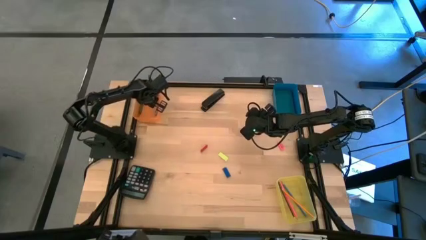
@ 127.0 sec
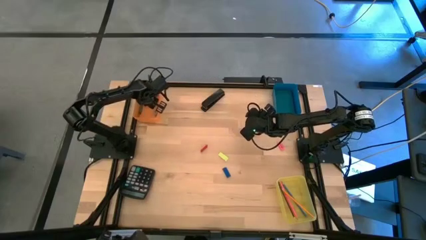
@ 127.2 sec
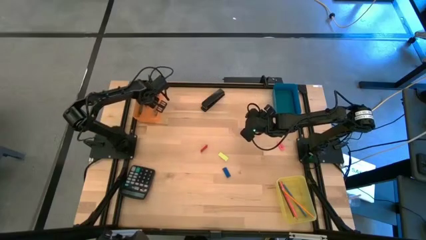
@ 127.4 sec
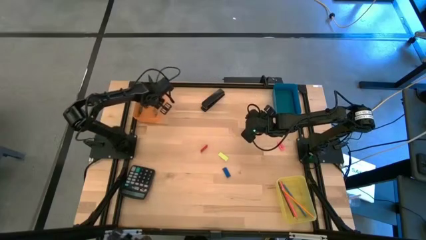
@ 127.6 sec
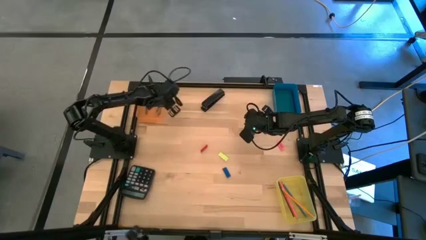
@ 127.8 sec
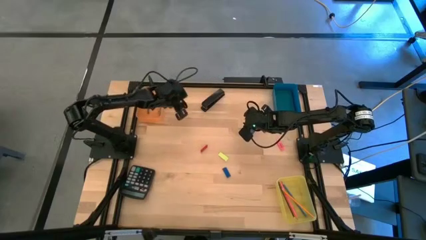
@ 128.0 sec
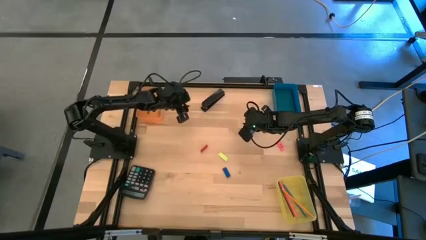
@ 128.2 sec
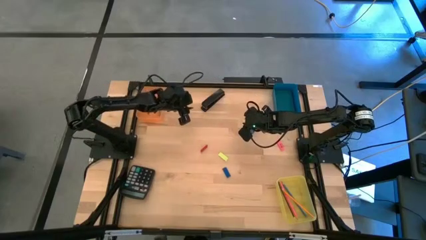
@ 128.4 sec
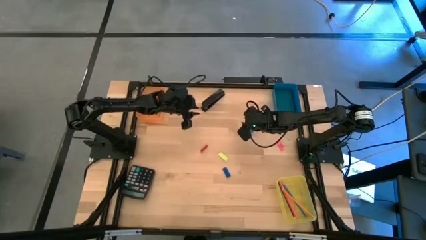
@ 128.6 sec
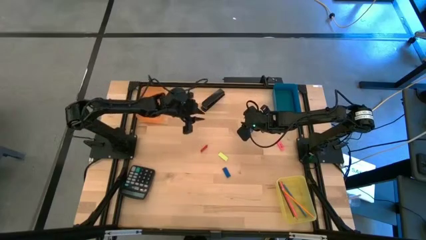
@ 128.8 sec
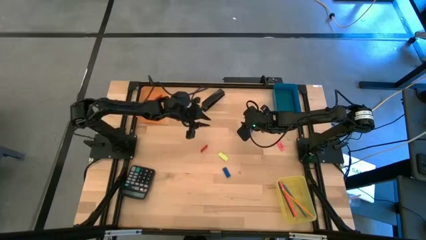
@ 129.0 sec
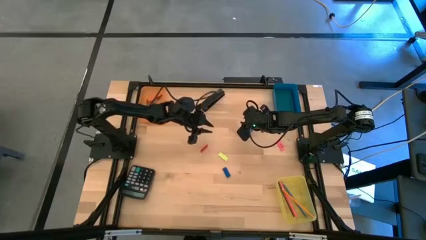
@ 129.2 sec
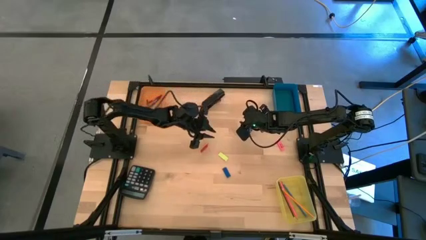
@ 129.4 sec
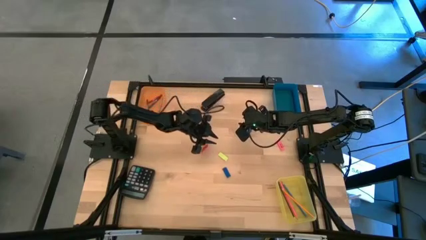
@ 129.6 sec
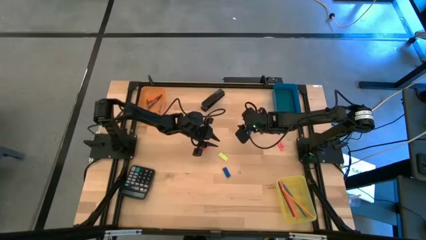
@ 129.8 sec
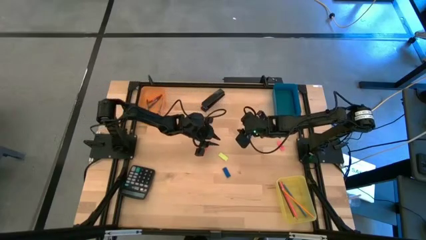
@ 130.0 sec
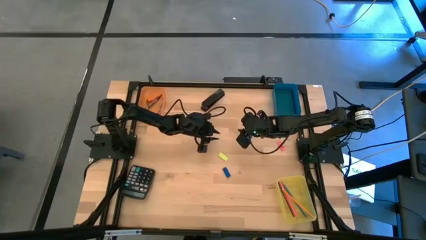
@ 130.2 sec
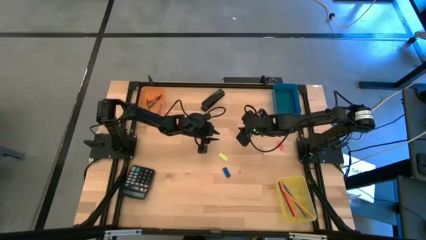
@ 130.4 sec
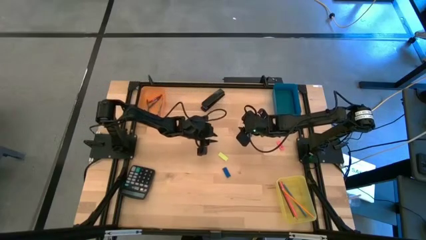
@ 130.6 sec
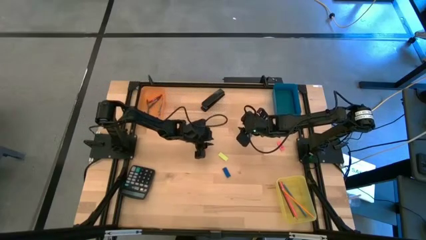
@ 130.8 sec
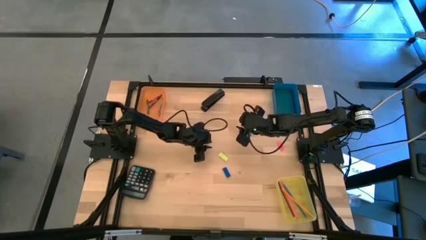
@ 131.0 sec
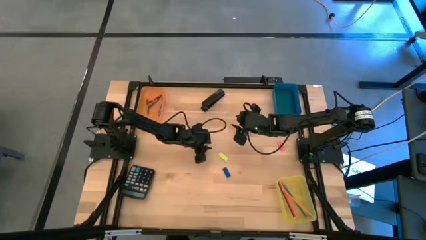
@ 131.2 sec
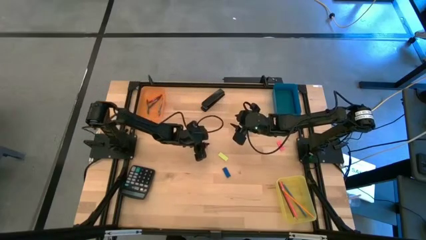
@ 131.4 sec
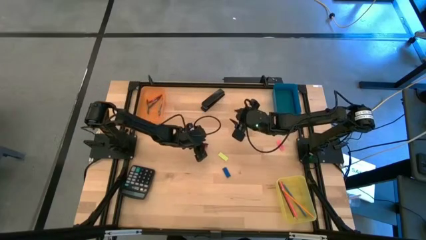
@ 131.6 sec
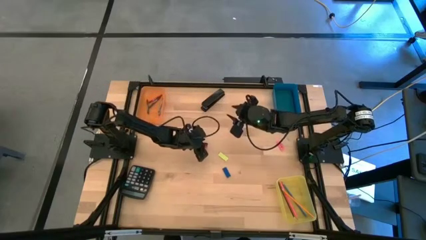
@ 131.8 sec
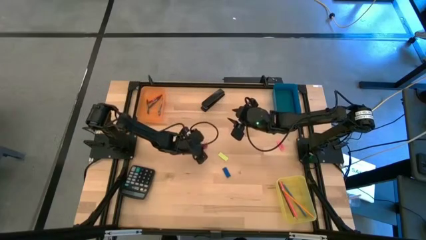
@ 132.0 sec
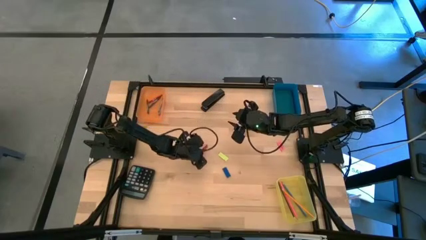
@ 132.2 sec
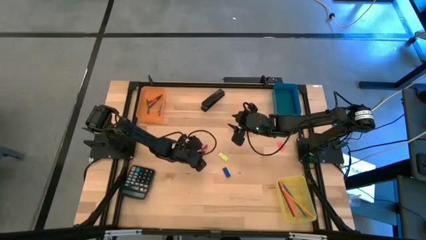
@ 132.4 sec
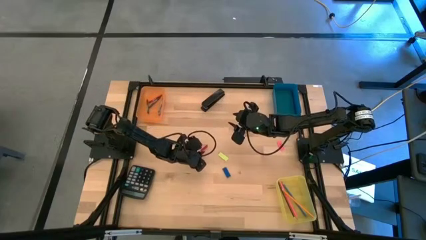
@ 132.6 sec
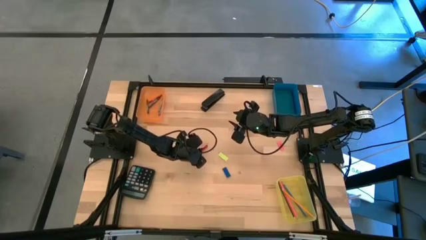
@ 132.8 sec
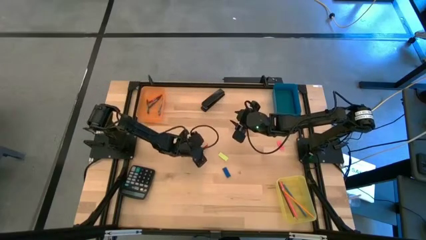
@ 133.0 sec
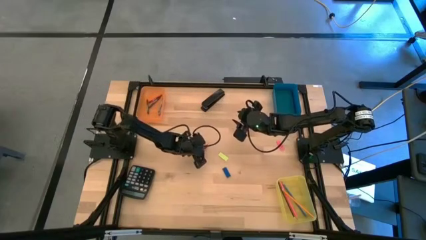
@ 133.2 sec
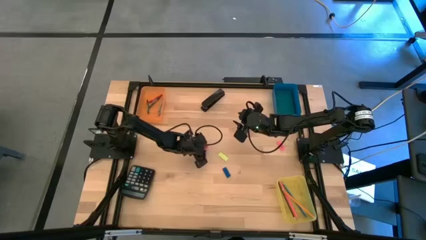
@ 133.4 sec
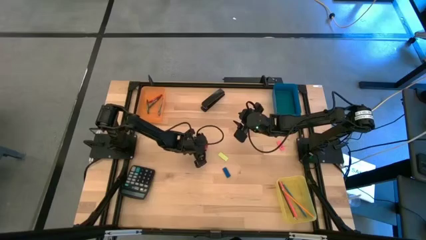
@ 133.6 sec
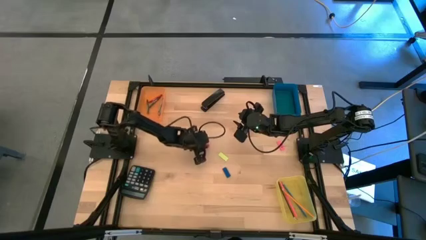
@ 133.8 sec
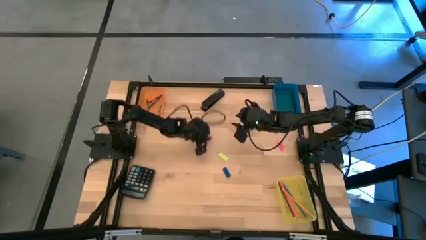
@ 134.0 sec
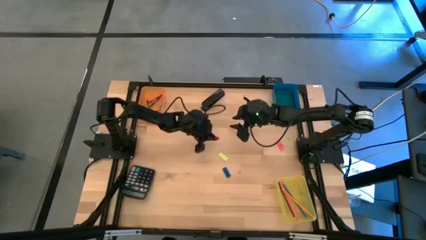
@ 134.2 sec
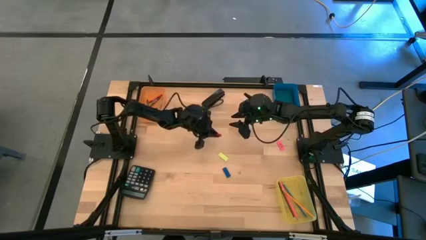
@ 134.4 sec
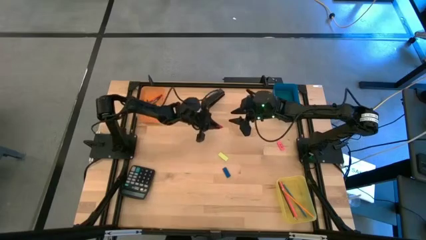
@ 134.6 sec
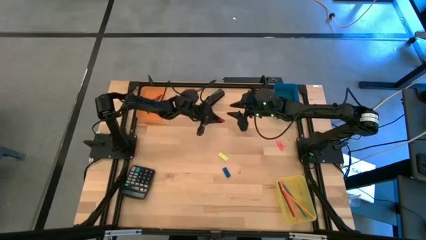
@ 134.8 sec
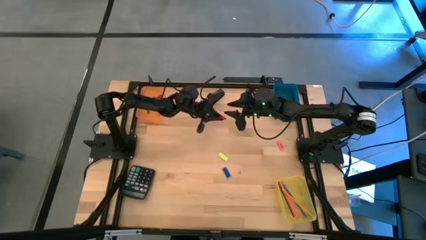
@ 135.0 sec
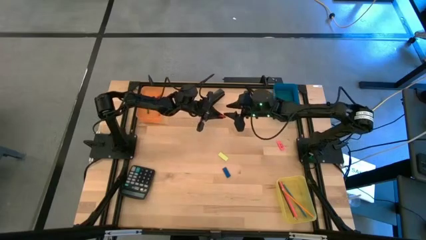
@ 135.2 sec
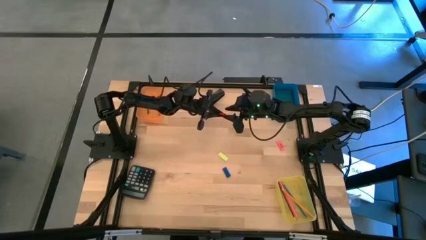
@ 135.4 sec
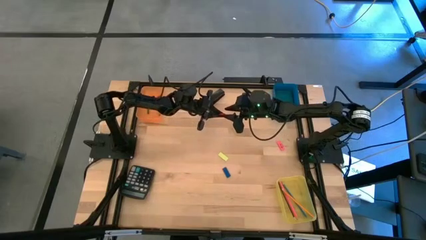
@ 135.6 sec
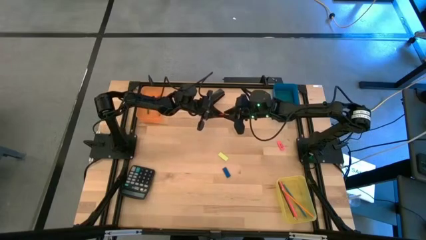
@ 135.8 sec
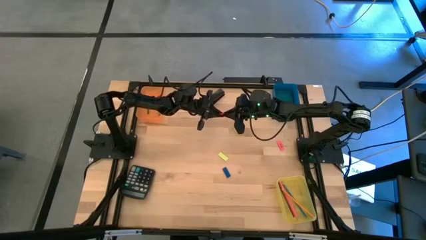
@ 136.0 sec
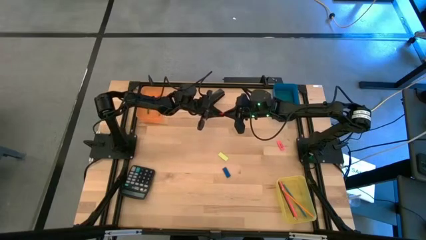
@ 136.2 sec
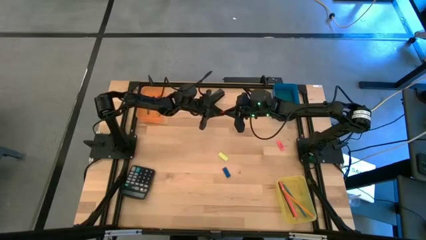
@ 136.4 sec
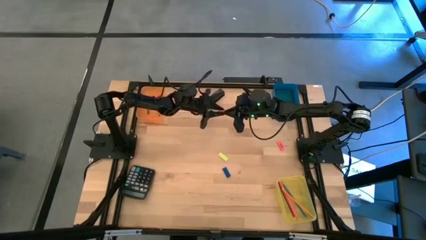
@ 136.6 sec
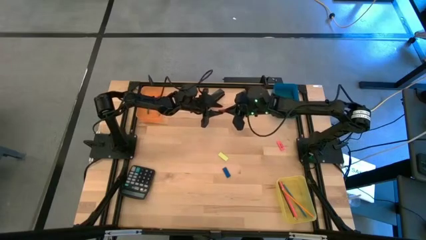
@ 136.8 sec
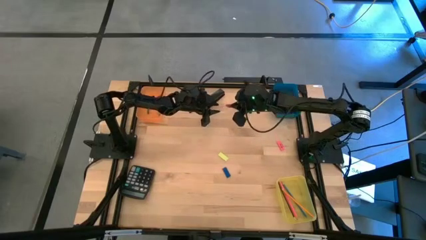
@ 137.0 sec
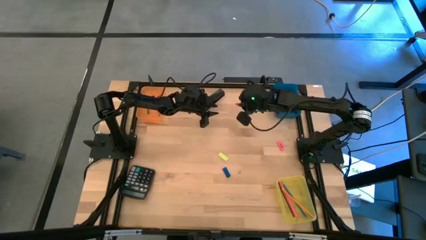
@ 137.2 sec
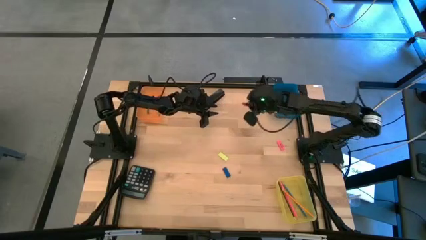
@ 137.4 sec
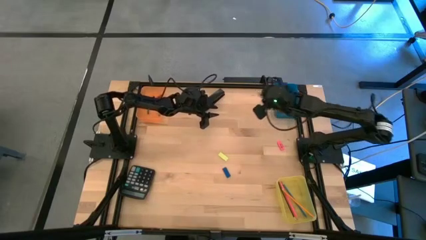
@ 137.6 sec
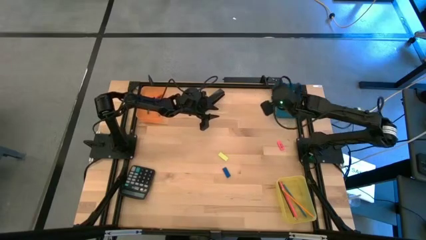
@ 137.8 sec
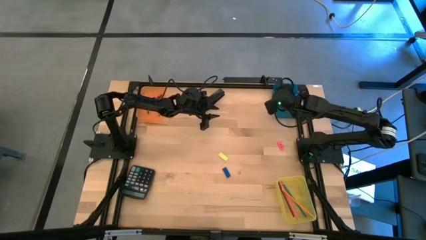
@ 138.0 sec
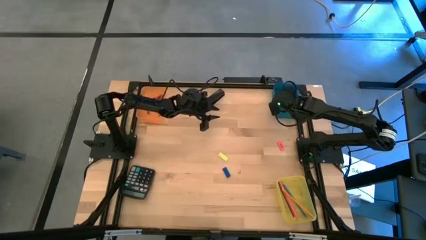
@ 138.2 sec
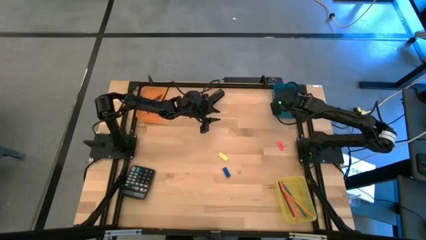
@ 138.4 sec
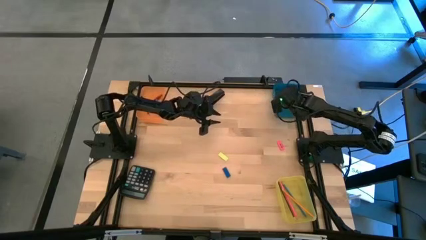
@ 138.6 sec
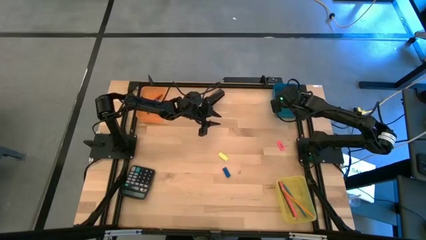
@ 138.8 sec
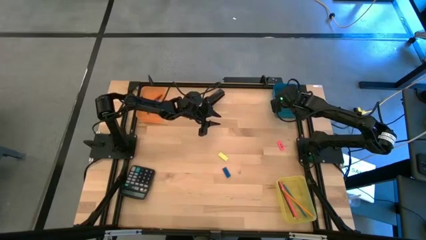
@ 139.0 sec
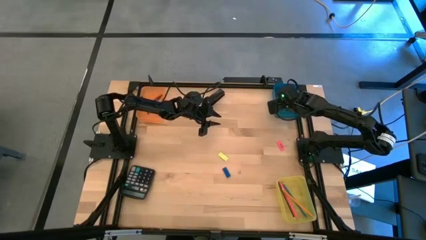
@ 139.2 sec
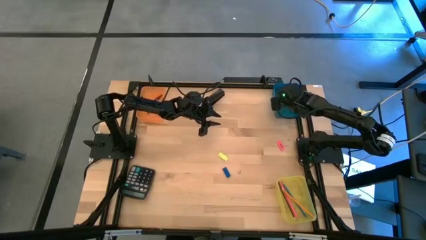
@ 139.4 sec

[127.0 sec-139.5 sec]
Task: Sort crayons/erasers/pens/pencils in bins
Put the red eraser into the blue bin

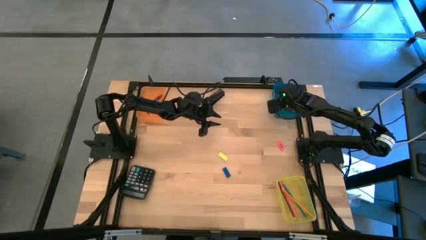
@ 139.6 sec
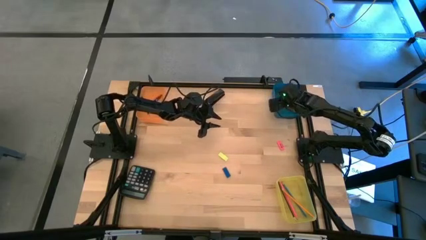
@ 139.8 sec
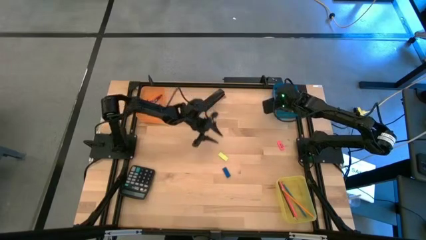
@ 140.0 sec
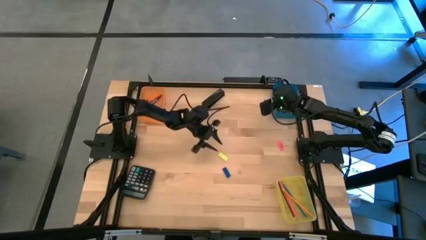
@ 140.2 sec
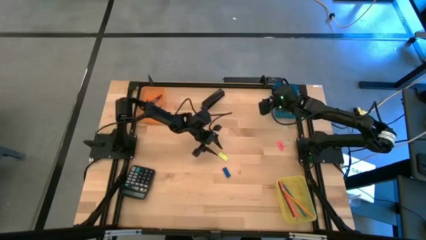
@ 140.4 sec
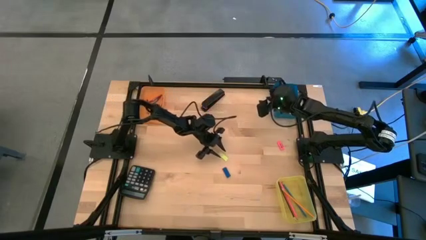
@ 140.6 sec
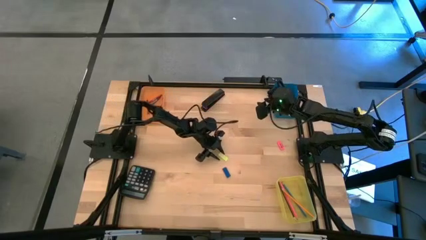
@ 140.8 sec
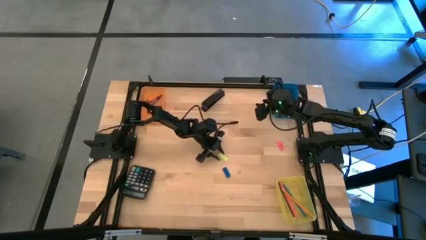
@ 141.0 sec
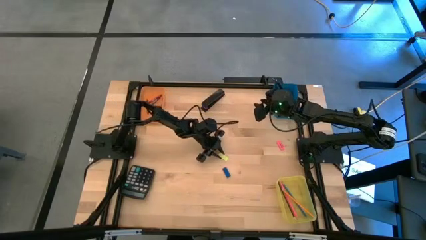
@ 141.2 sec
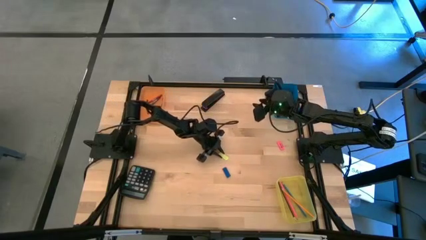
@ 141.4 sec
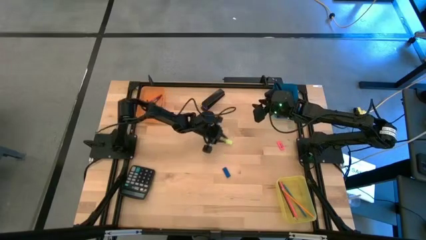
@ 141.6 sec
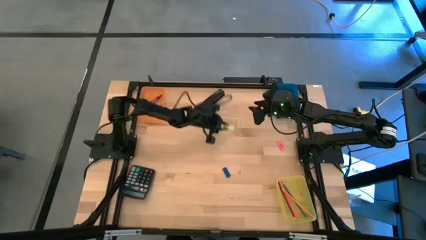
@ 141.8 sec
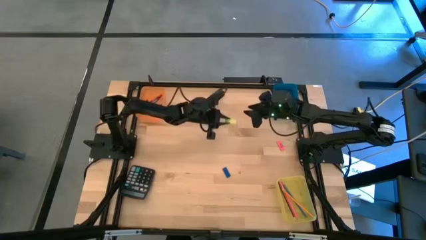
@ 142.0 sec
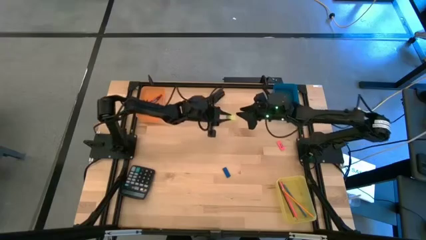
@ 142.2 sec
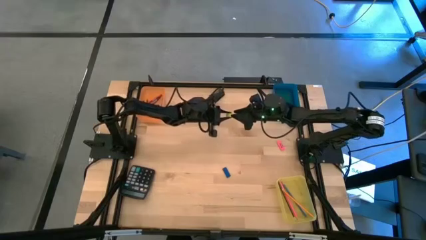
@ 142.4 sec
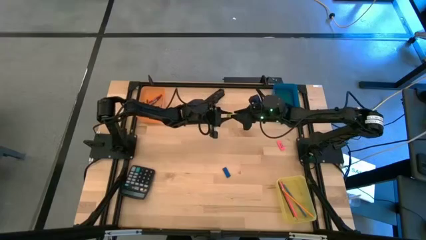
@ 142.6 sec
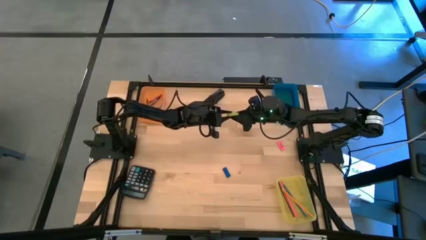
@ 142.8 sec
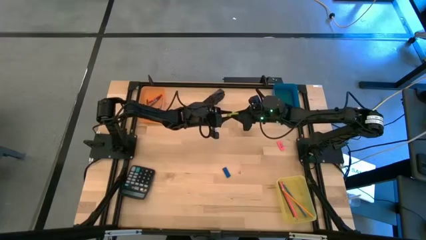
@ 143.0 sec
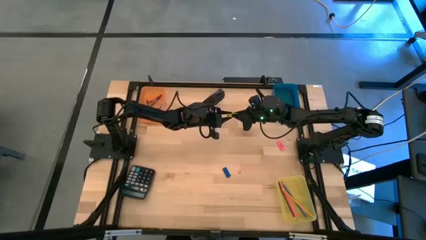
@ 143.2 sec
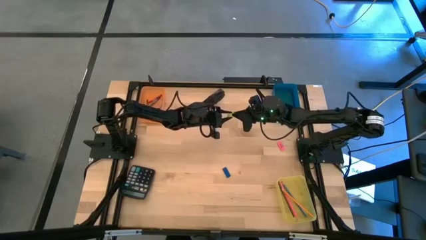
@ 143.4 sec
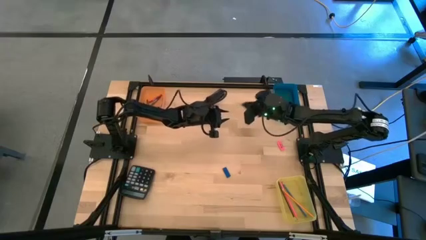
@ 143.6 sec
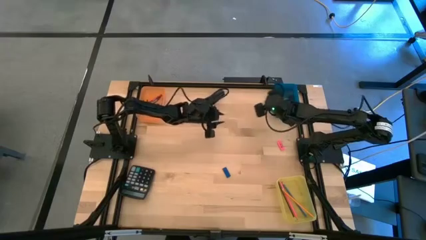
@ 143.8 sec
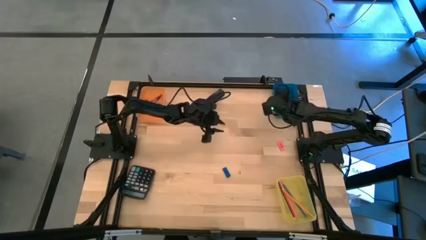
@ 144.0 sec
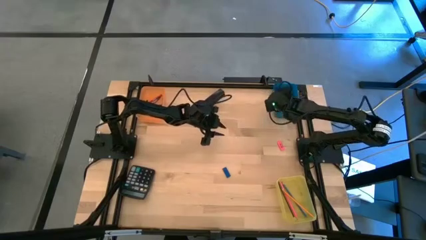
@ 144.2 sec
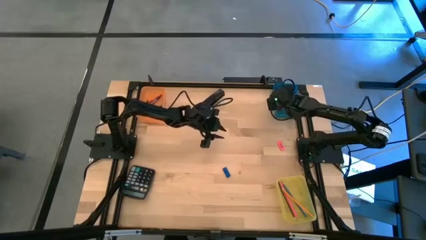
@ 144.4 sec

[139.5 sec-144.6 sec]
Put the yellow eraser into the blue bin
